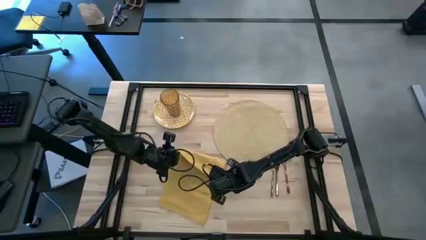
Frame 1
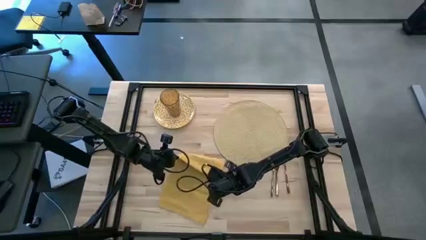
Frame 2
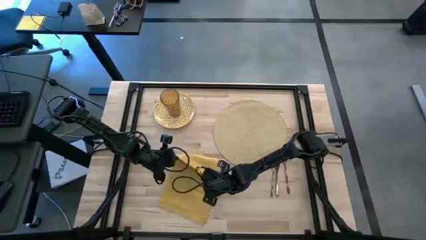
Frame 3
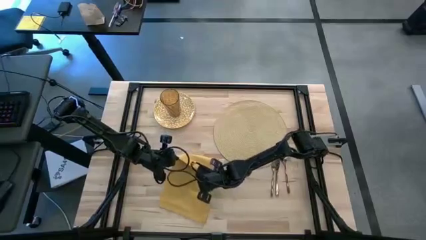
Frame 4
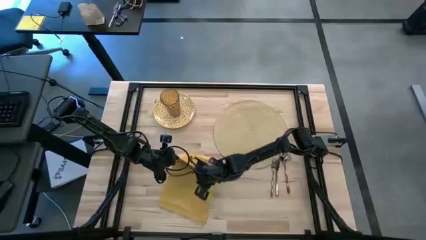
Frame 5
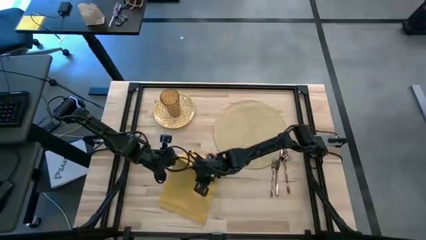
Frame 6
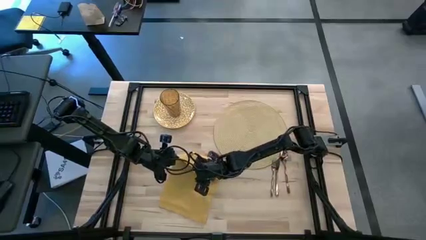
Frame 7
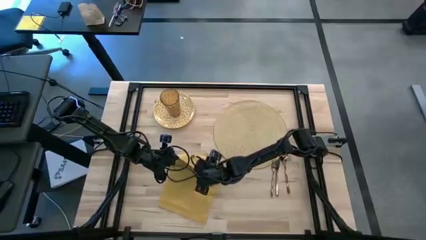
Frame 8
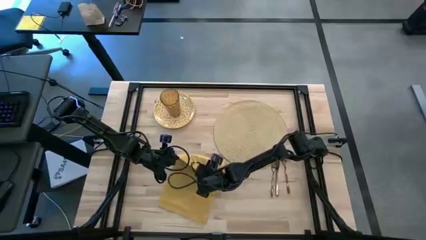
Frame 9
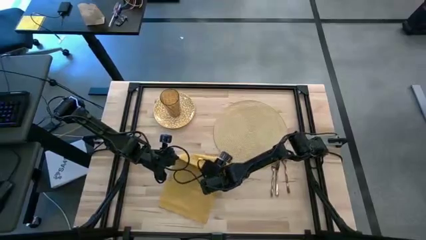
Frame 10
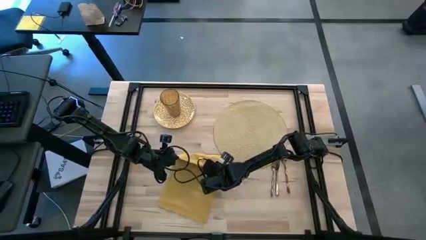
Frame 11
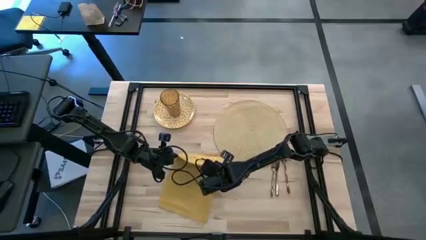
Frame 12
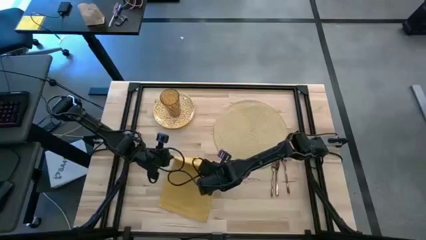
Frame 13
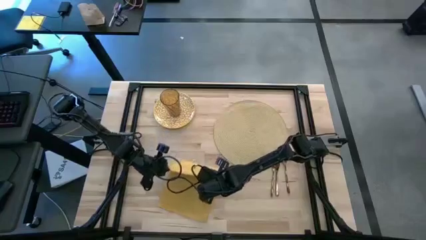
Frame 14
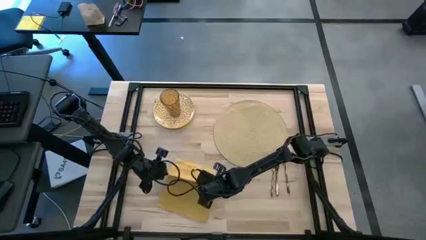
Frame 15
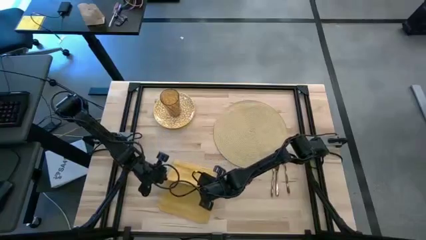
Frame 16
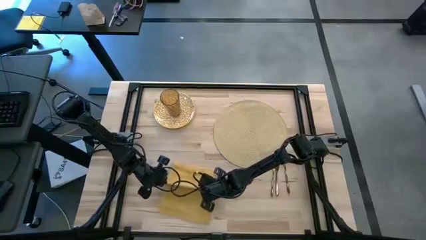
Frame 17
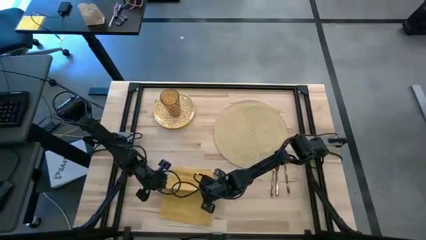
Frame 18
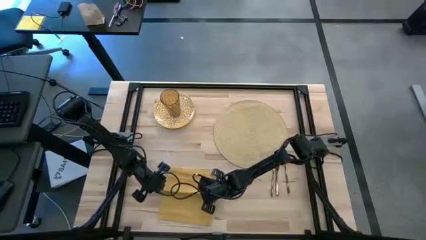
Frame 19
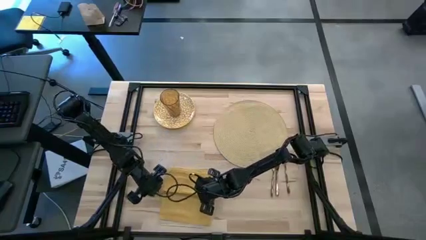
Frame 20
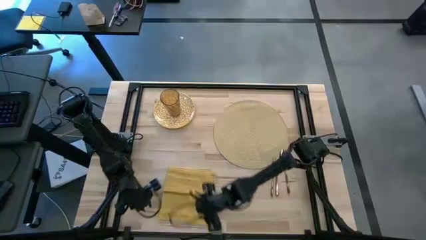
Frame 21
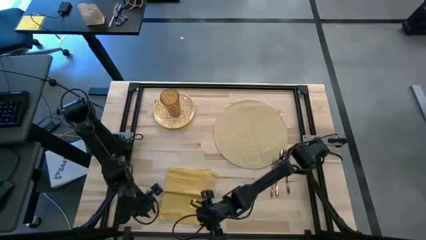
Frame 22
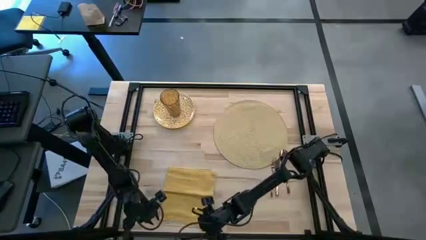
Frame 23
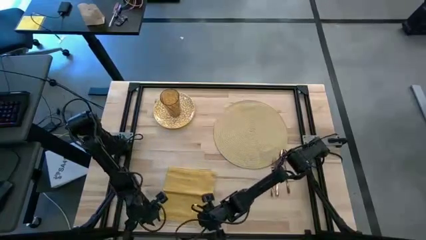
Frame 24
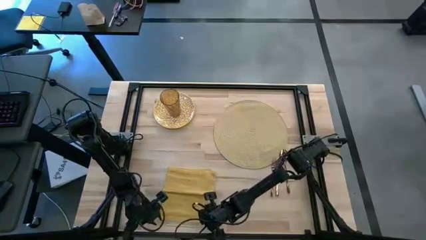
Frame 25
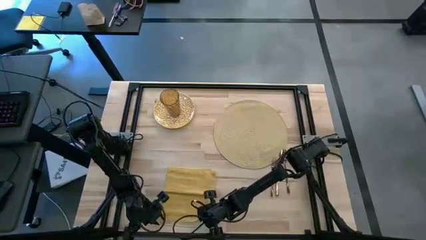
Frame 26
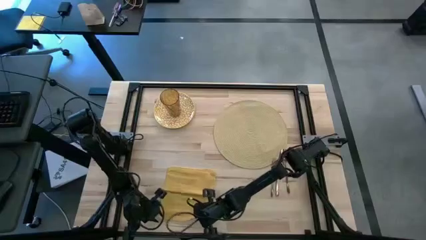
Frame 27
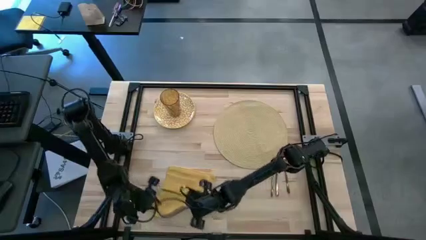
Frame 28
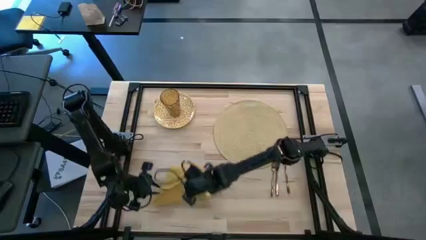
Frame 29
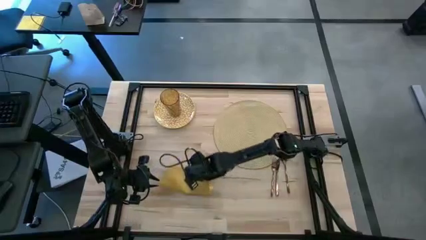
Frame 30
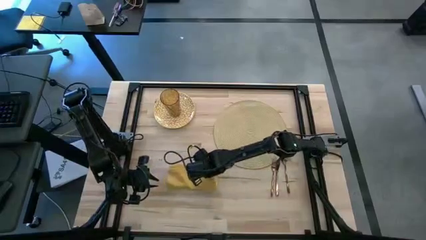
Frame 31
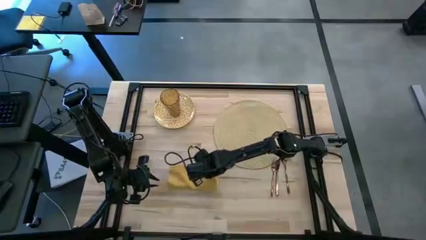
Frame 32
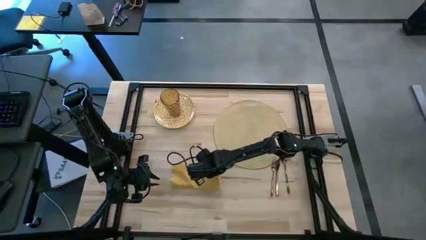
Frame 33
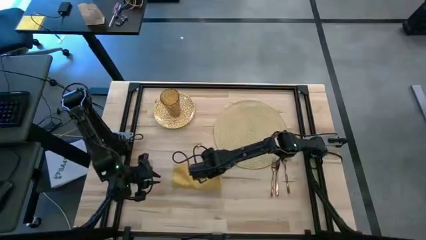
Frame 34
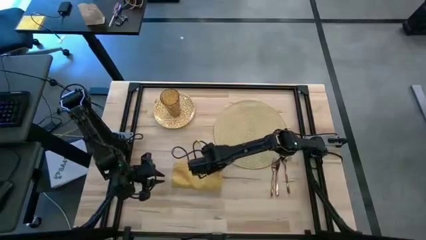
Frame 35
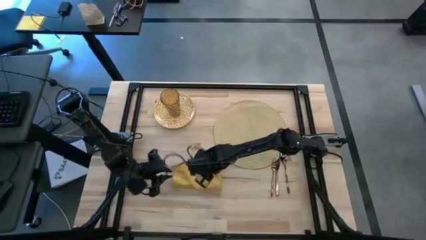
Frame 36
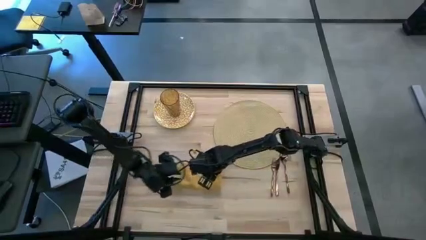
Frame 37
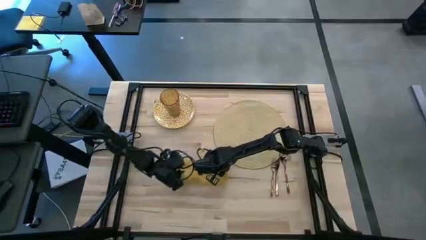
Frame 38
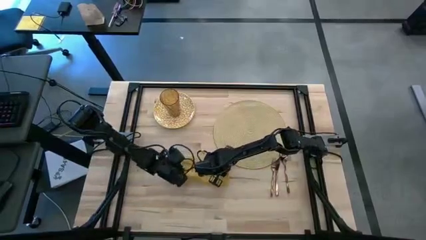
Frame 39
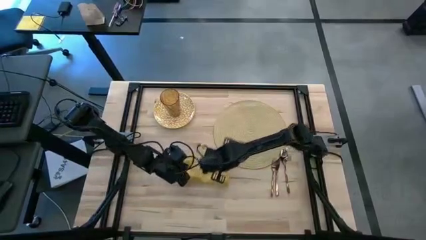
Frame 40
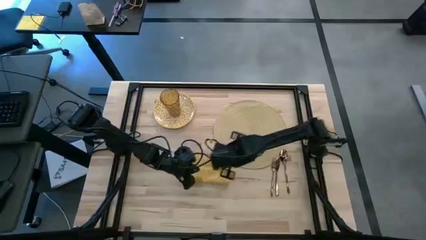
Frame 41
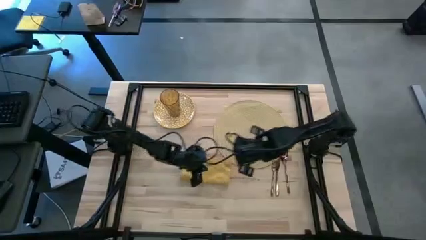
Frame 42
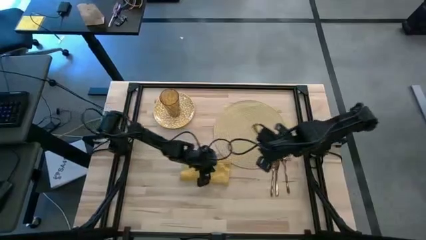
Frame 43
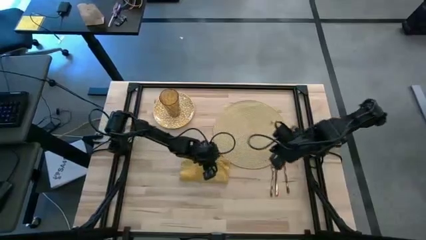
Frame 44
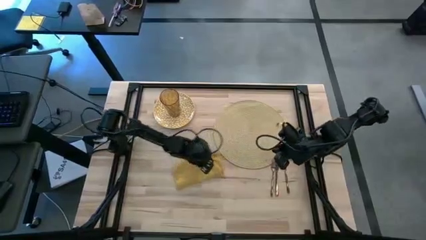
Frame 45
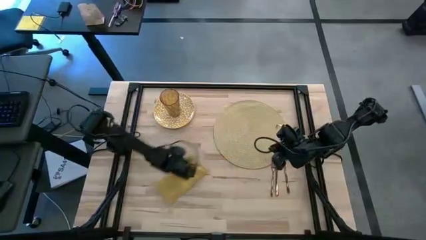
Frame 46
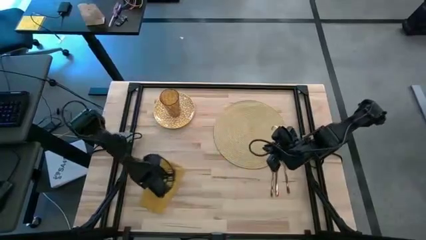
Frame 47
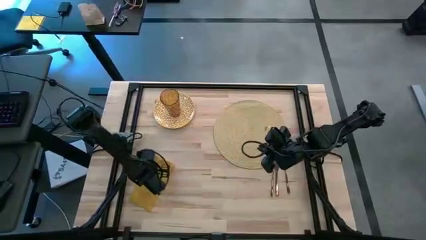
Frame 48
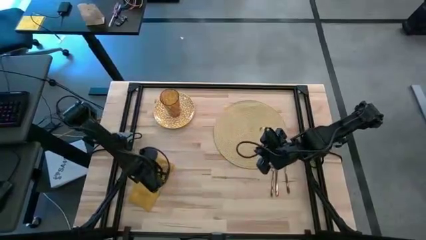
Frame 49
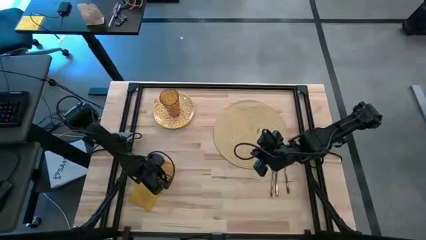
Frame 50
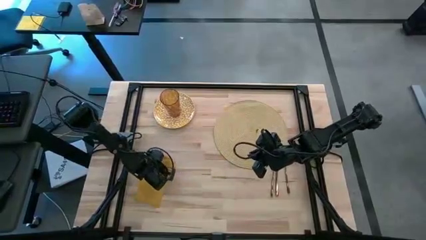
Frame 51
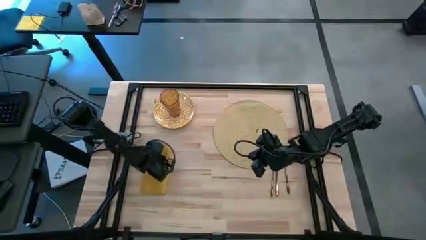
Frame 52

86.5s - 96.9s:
Task: Set table place
Fold the yellow table napkin

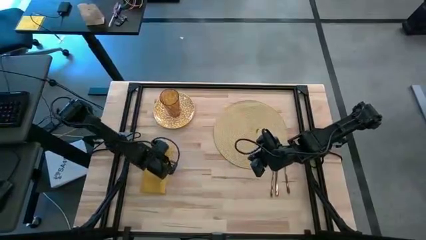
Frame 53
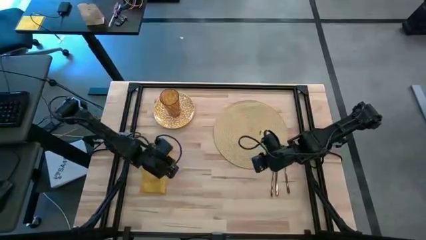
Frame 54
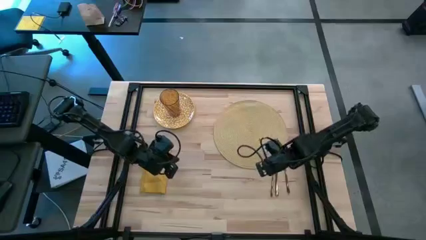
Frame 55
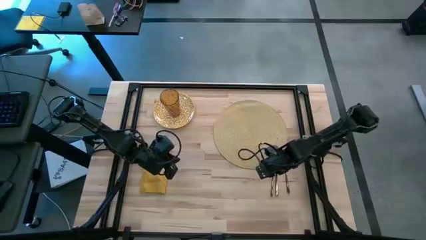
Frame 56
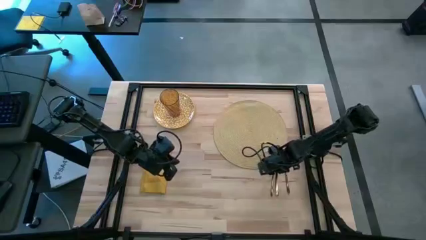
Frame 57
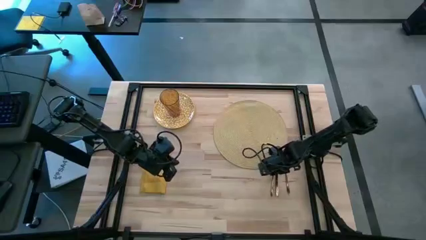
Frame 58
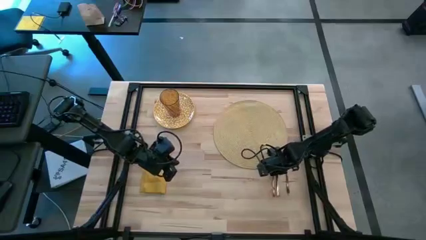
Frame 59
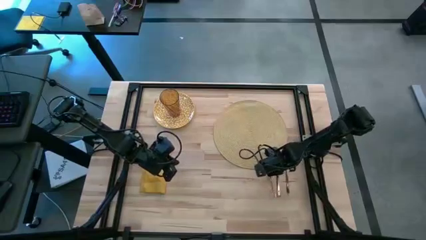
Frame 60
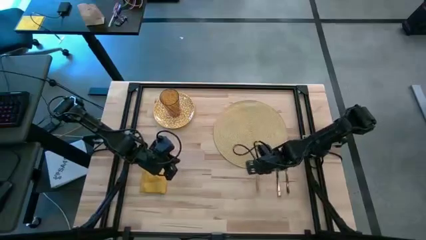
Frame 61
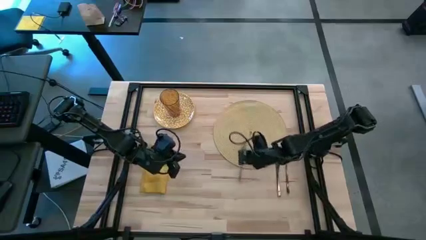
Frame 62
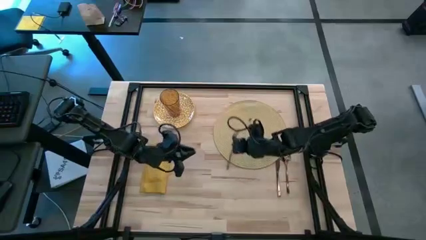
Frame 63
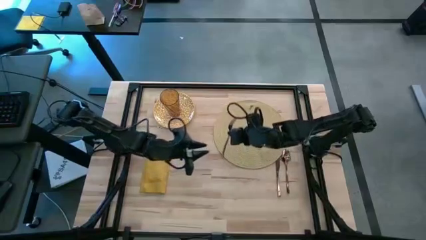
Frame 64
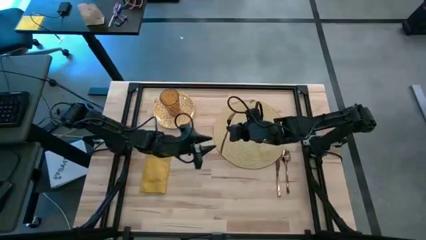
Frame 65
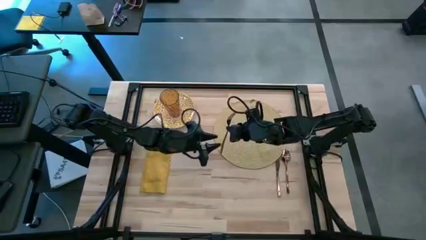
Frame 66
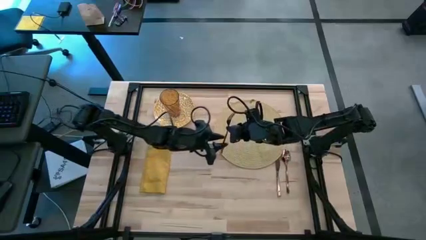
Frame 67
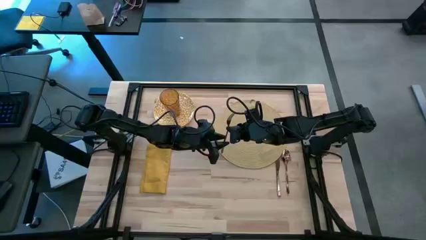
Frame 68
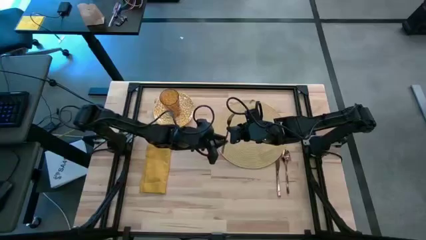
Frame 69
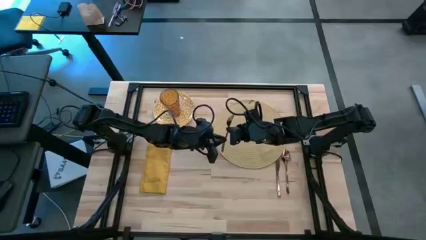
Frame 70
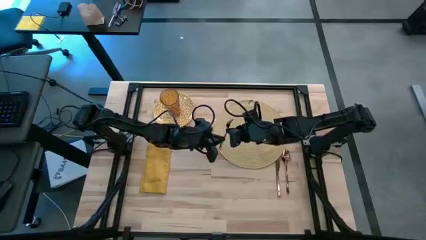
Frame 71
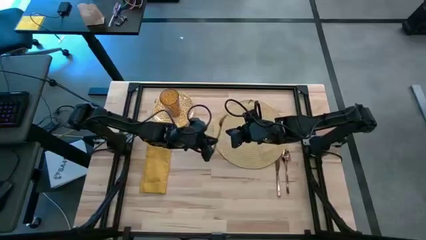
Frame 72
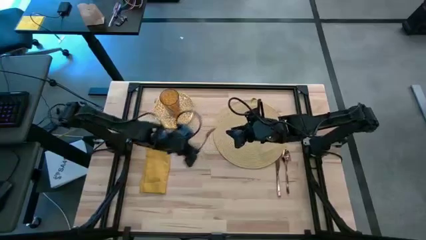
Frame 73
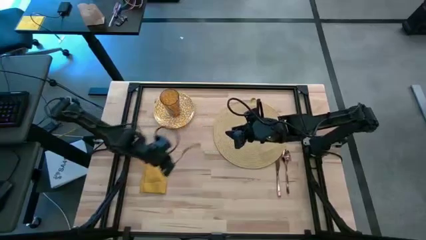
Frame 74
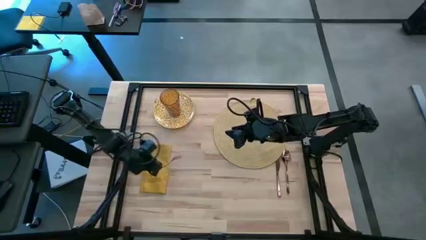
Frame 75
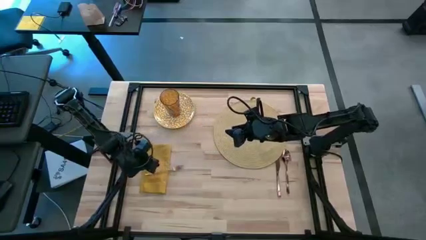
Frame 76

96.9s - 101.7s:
Put the bronze fork on the yellow table napkin
